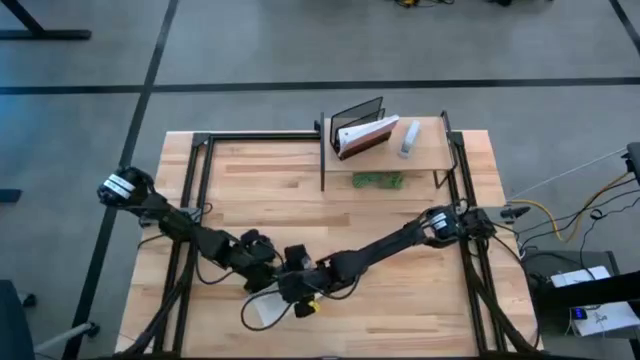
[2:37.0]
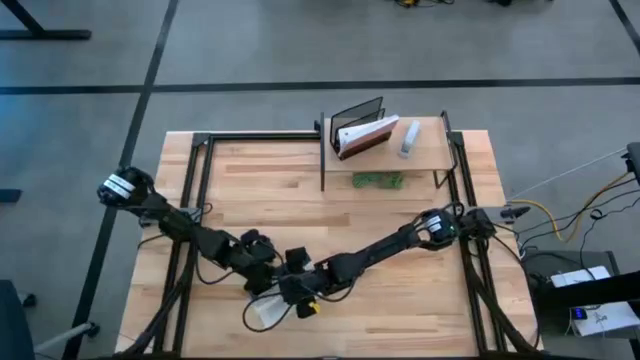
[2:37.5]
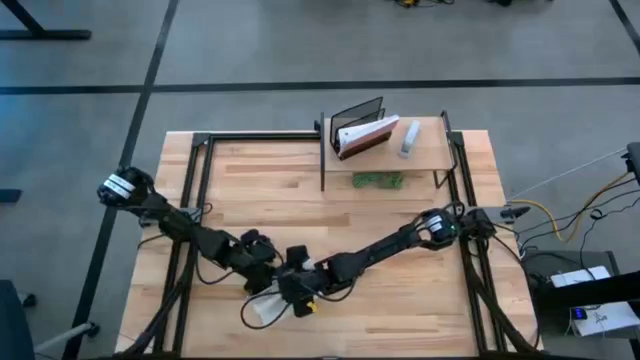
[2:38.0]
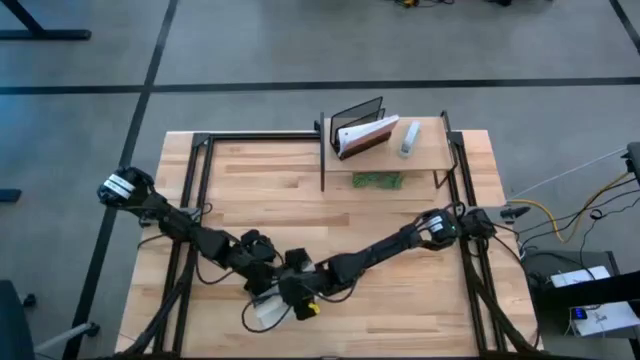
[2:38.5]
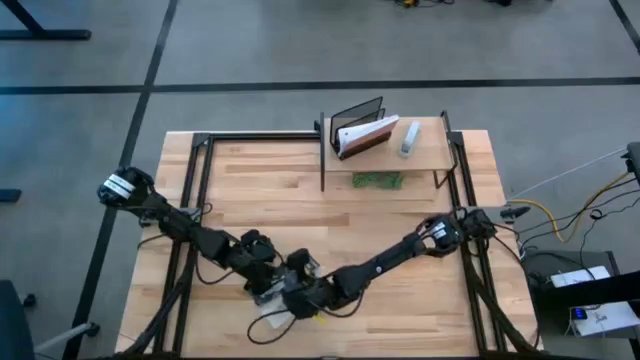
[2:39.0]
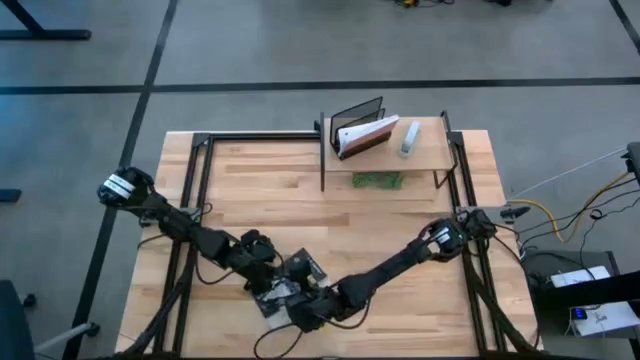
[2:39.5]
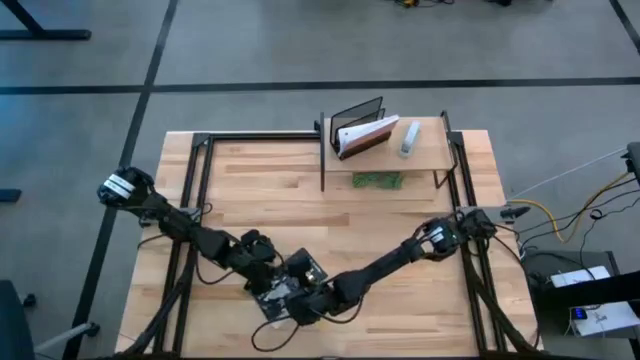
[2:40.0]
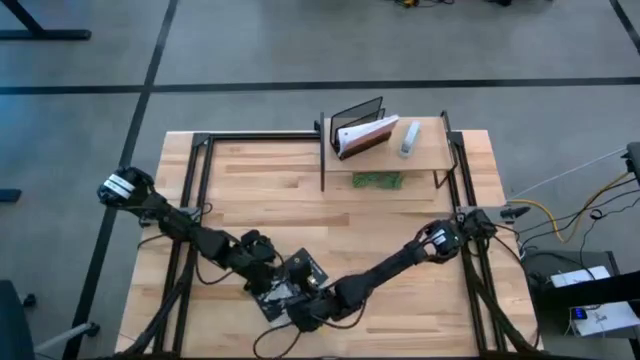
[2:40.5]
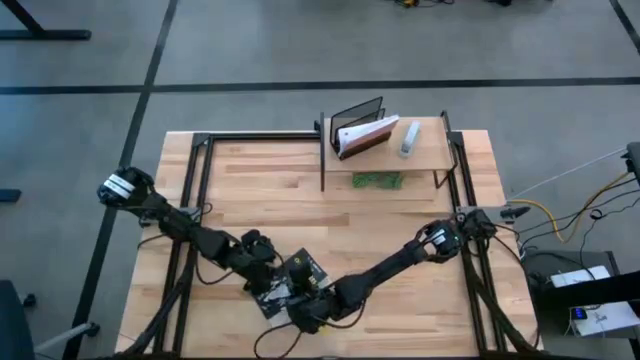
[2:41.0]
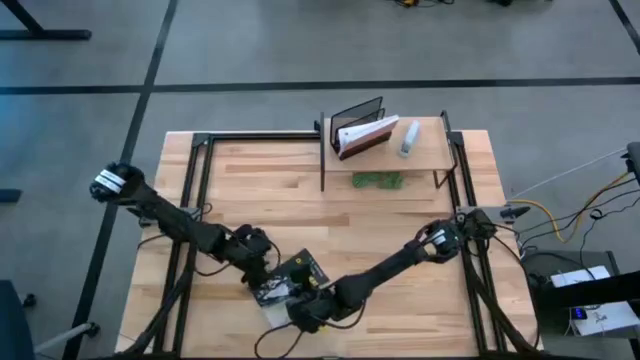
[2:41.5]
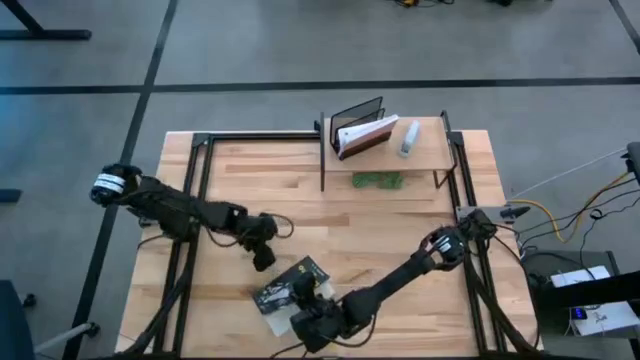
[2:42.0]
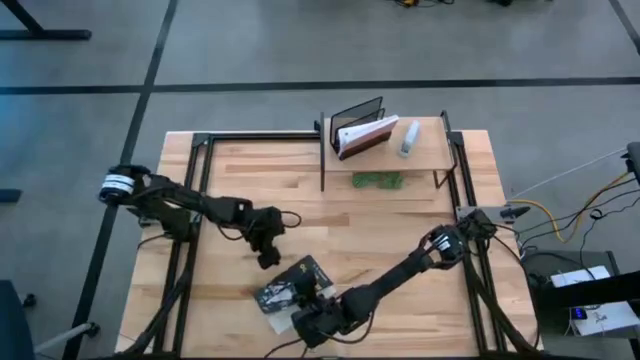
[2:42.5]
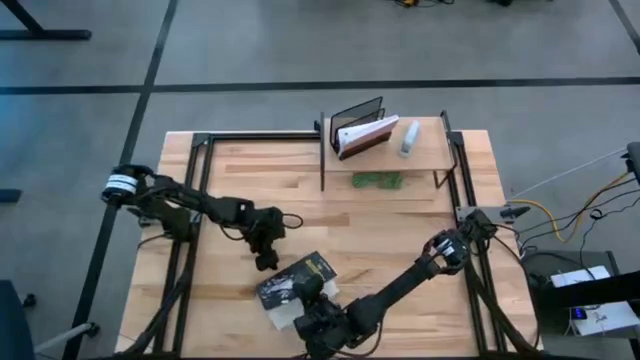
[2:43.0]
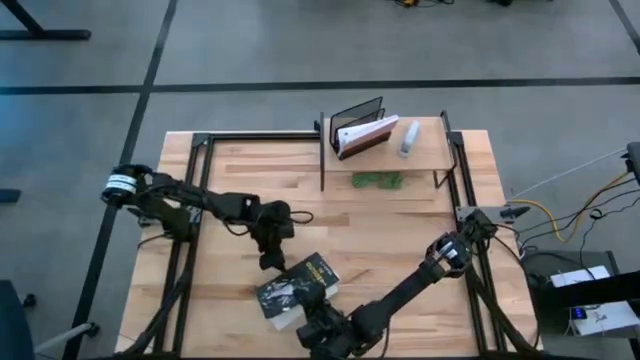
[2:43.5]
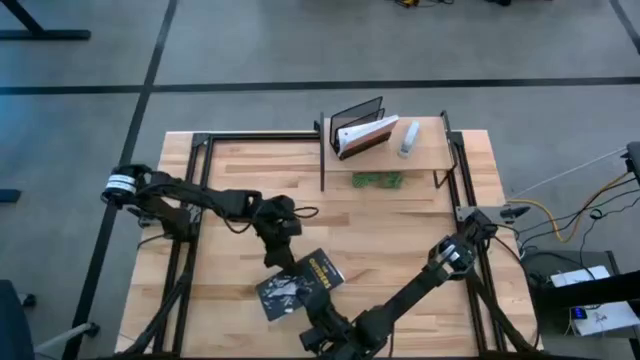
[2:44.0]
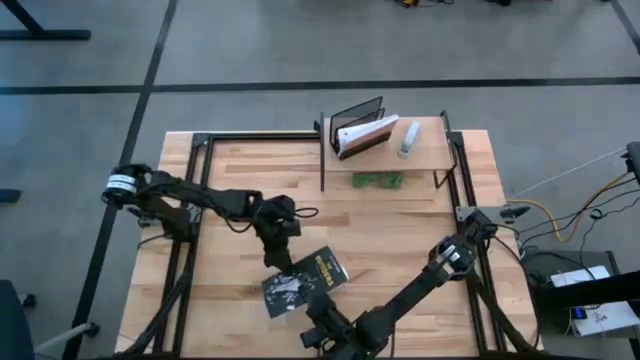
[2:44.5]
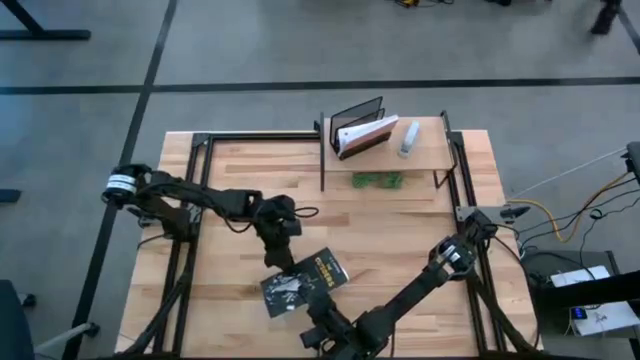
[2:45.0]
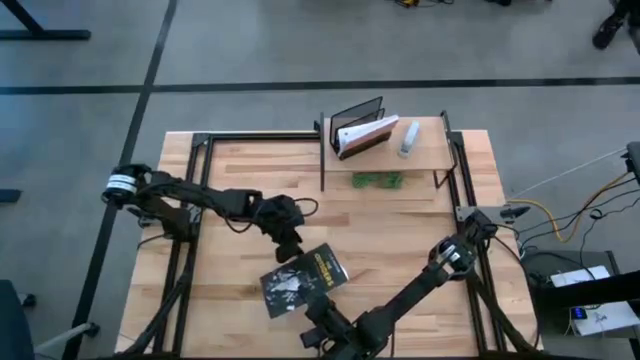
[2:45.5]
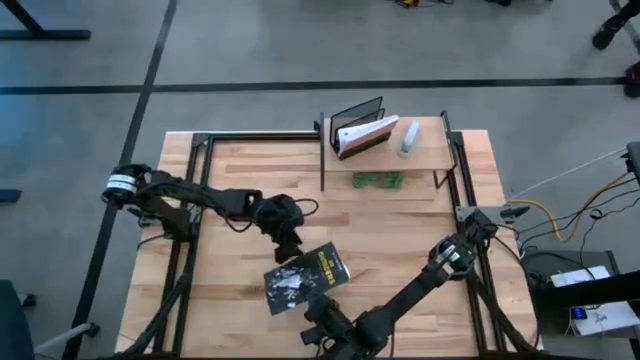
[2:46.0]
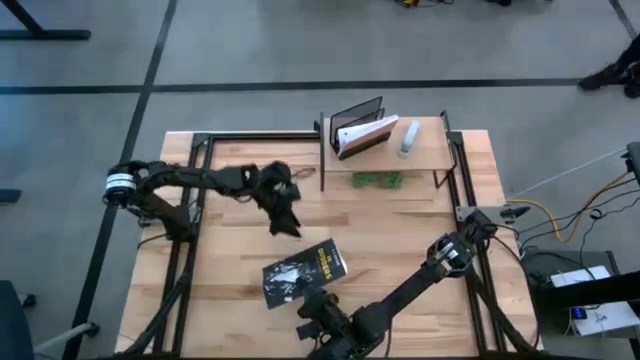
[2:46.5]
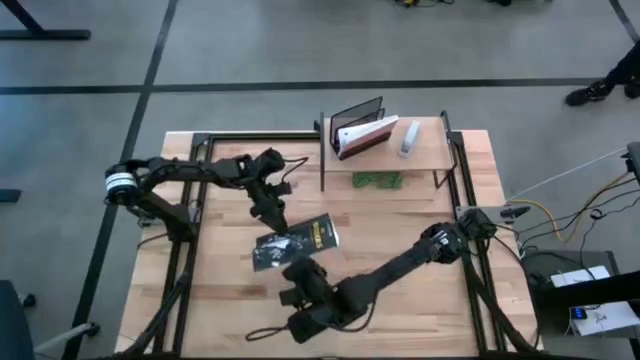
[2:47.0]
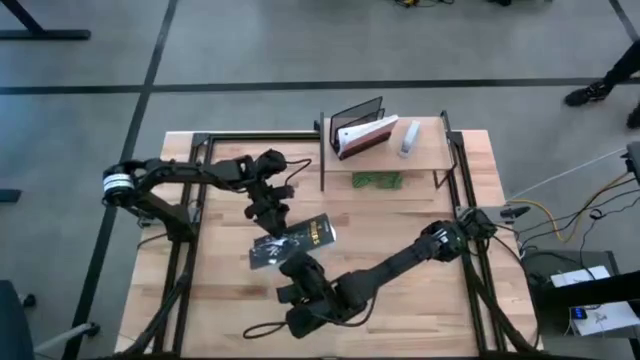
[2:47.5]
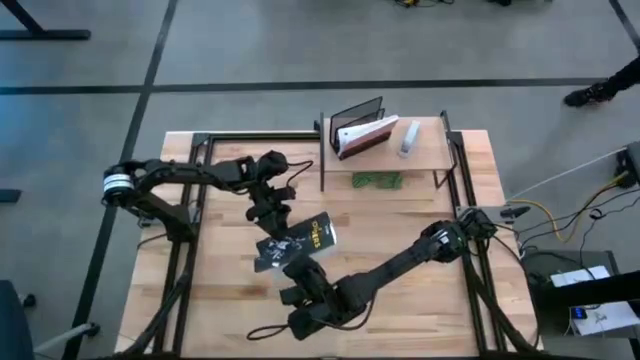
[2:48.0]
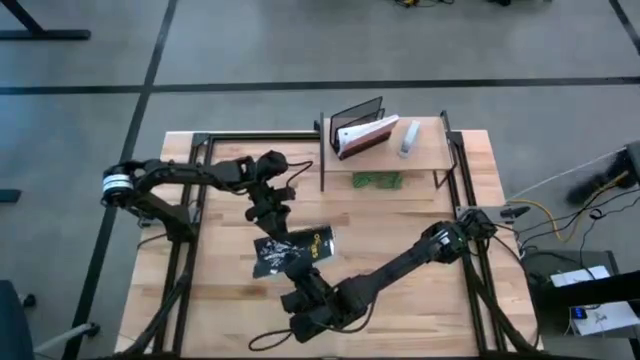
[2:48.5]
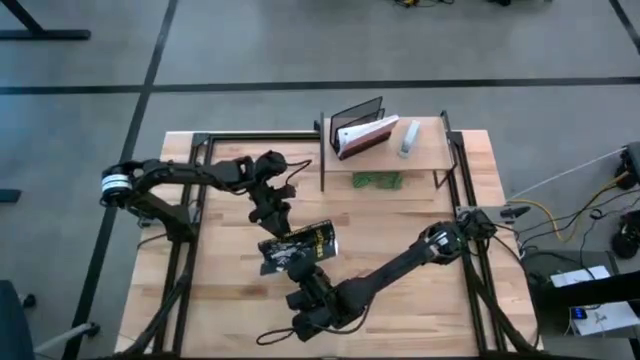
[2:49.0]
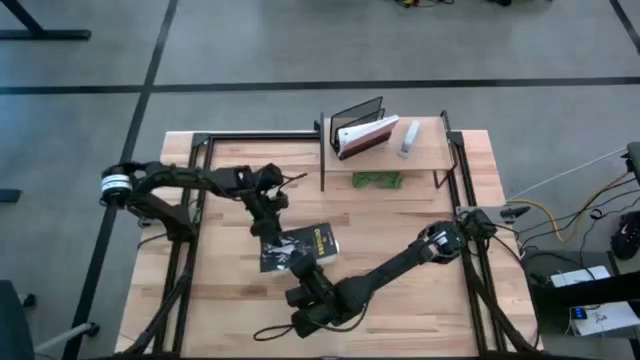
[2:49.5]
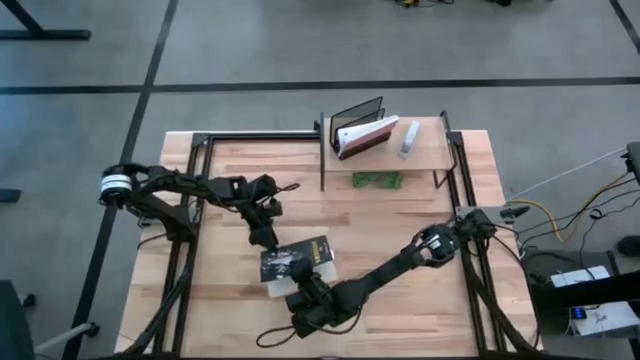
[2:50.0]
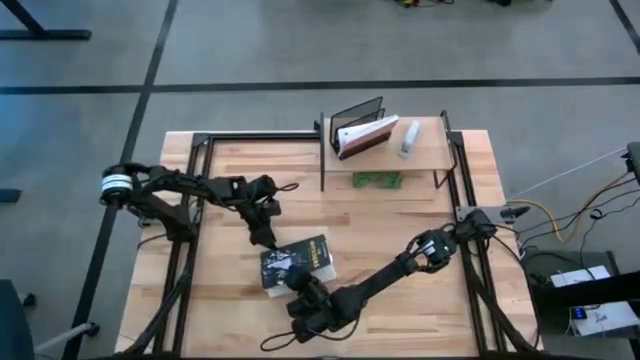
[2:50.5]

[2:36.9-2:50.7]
Task: Stock shelves
Put the black book into the black desk organizer on the shelf

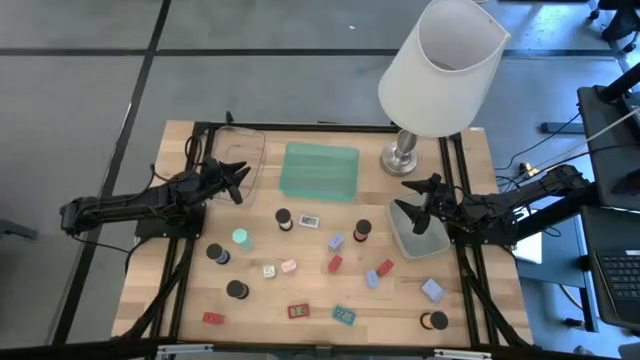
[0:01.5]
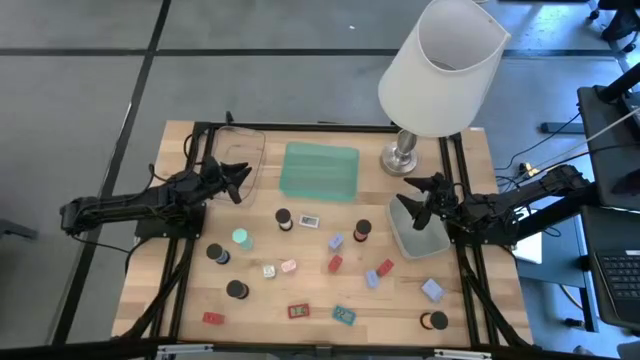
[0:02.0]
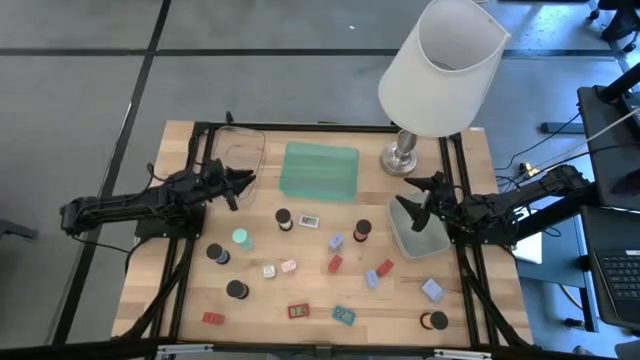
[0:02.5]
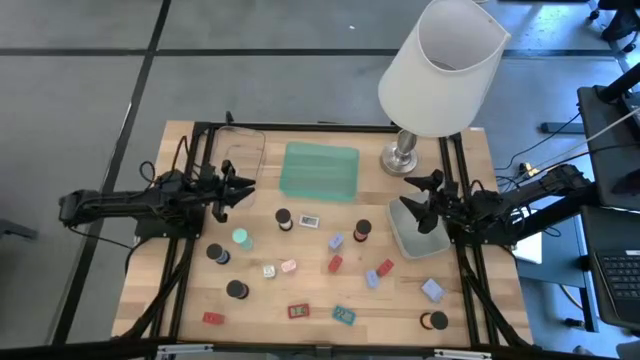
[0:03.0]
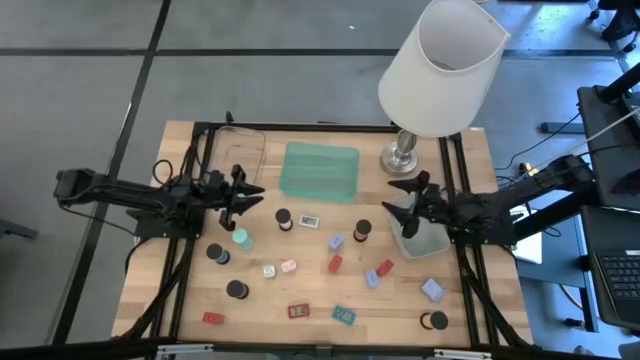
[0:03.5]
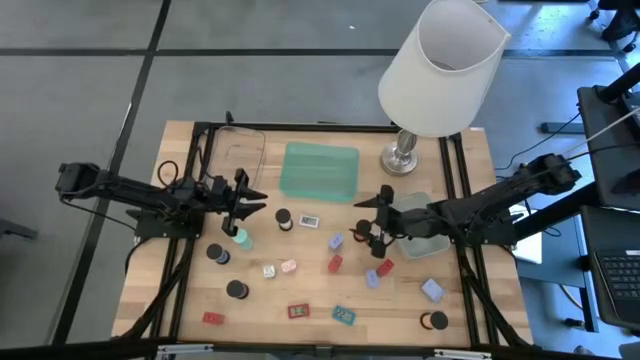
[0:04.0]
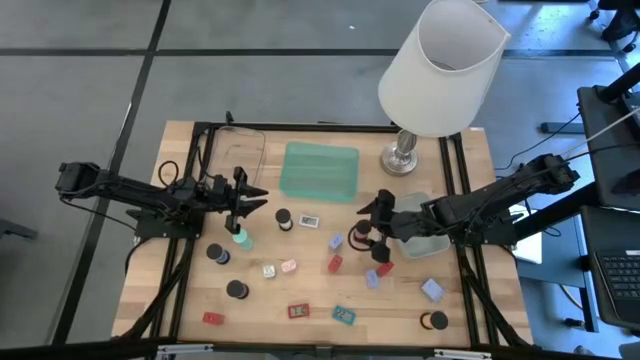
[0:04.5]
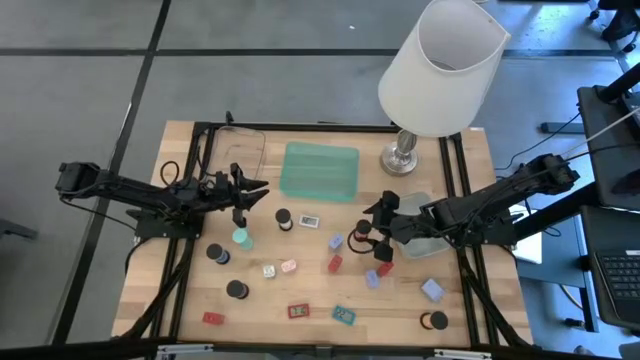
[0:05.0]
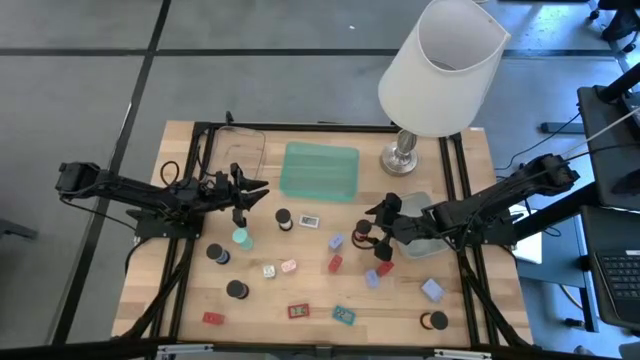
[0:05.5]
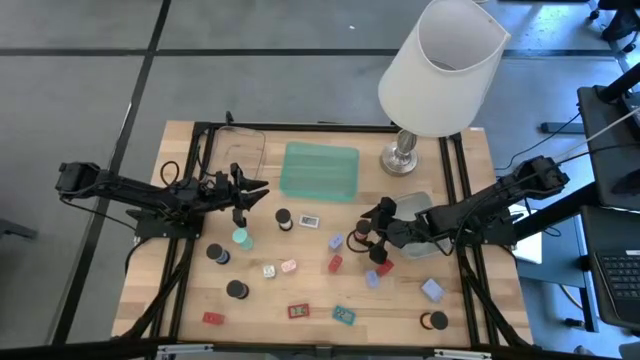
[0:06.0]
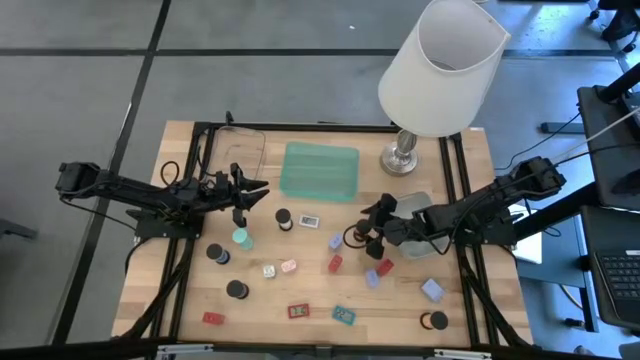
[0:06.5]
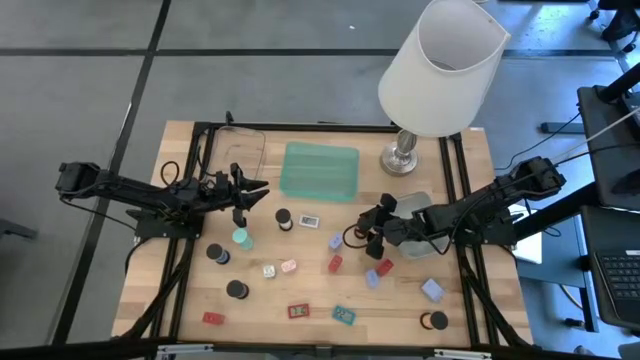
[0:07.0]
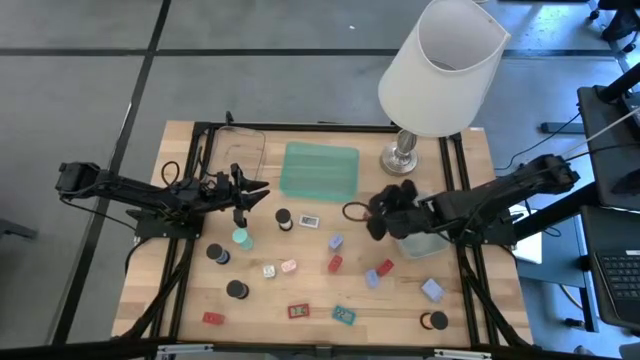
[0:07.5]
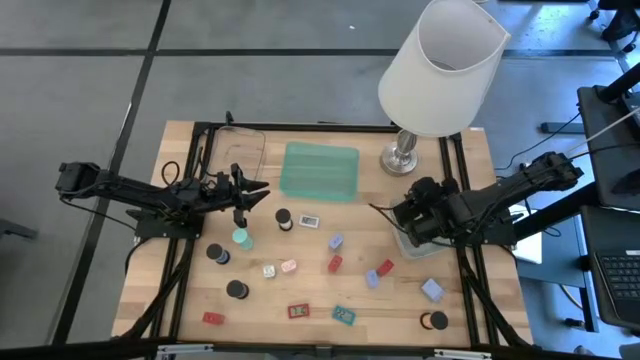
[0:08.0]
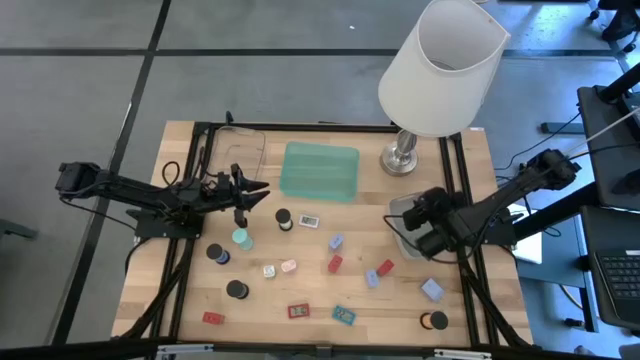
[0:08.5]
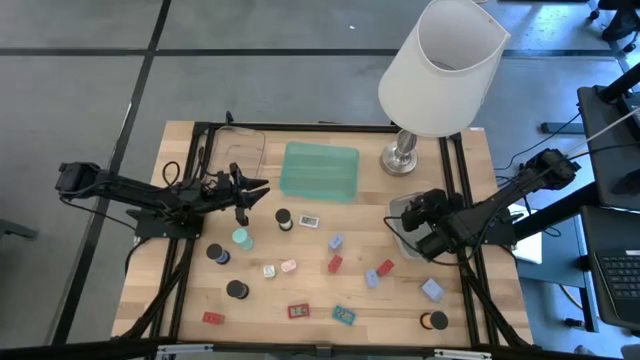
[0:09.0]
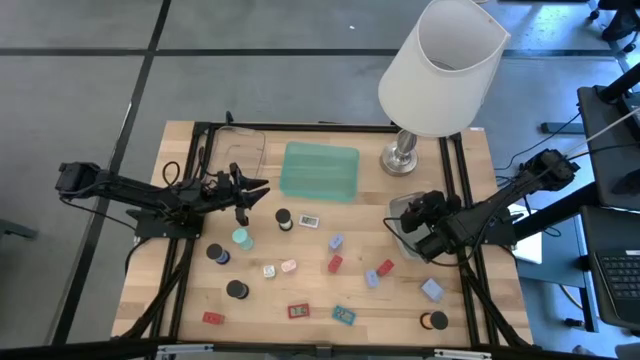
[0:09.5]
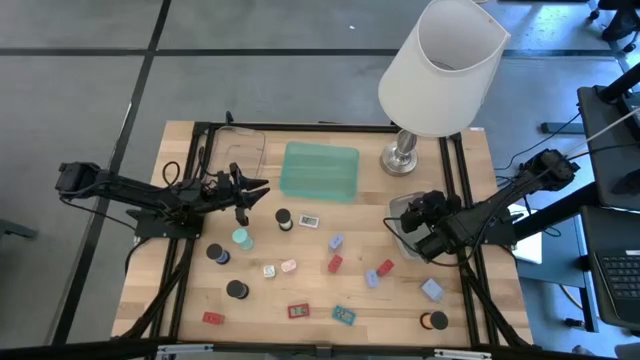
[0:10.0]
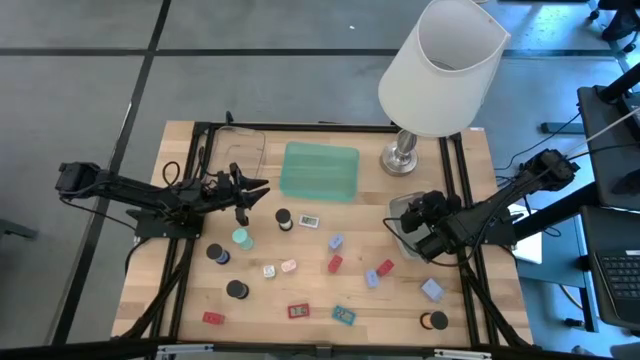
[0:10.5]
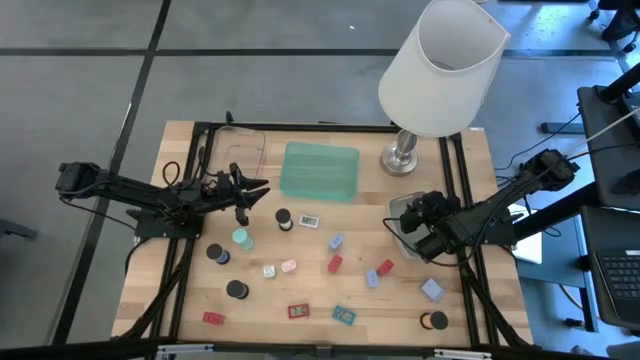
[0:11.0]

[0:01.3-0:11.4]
Task: Pick & Place Office items
Put the pink hourglass into the gray bin
